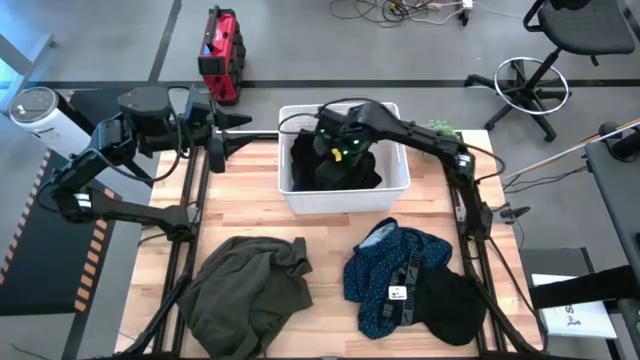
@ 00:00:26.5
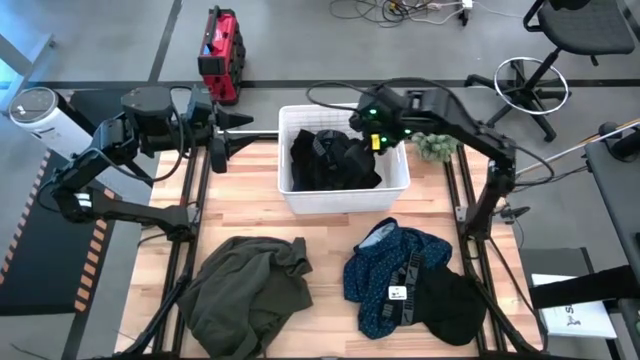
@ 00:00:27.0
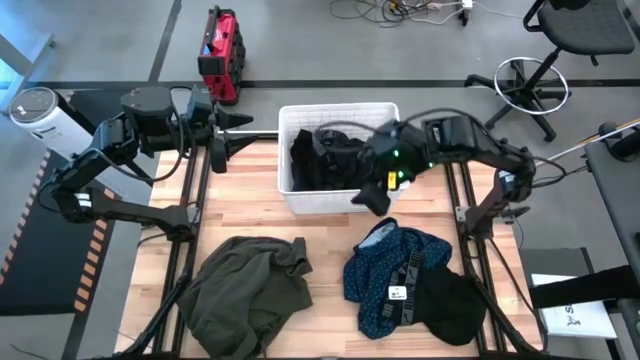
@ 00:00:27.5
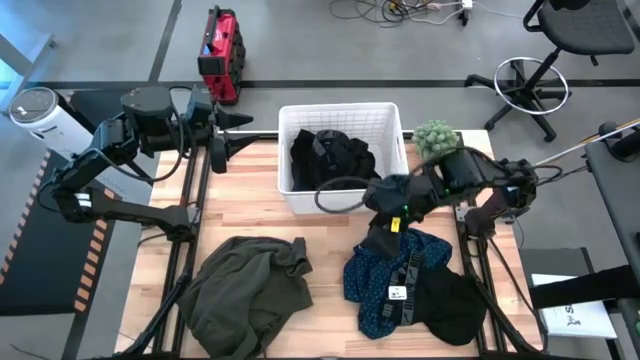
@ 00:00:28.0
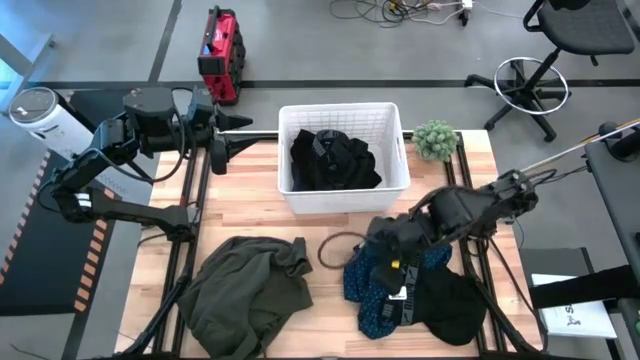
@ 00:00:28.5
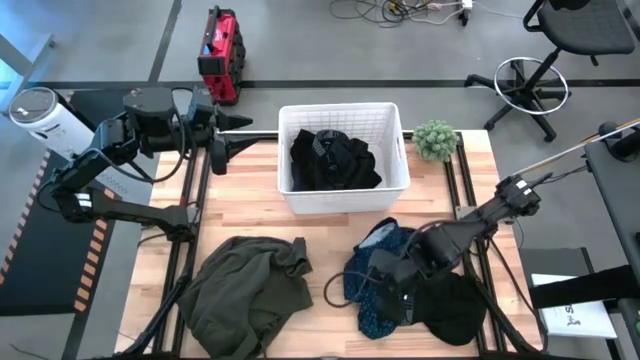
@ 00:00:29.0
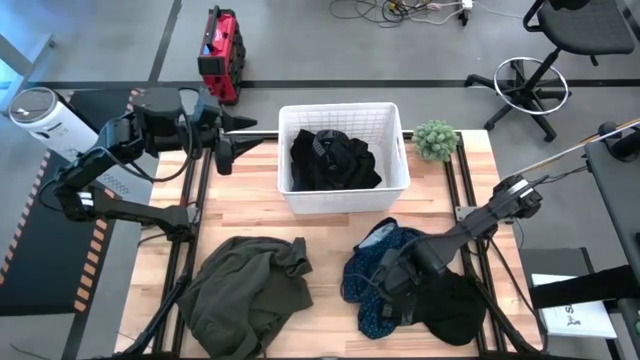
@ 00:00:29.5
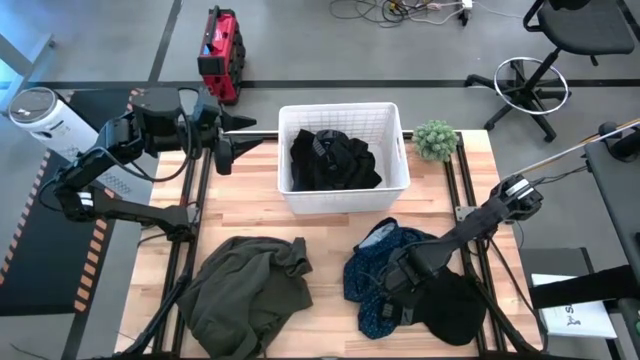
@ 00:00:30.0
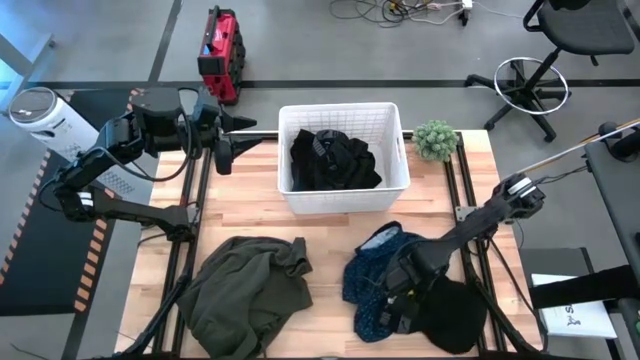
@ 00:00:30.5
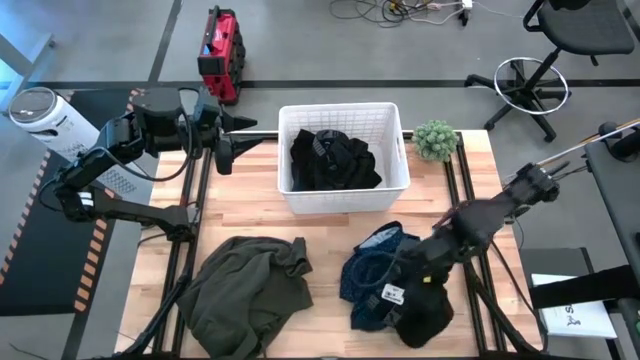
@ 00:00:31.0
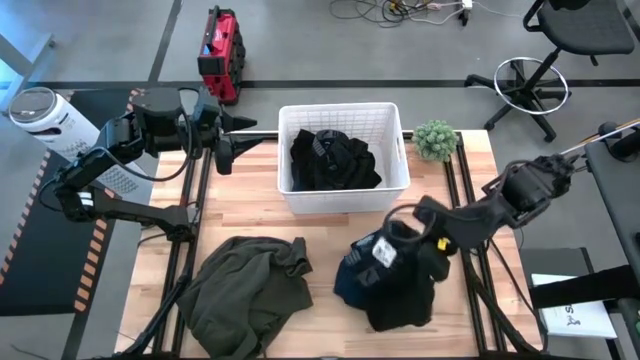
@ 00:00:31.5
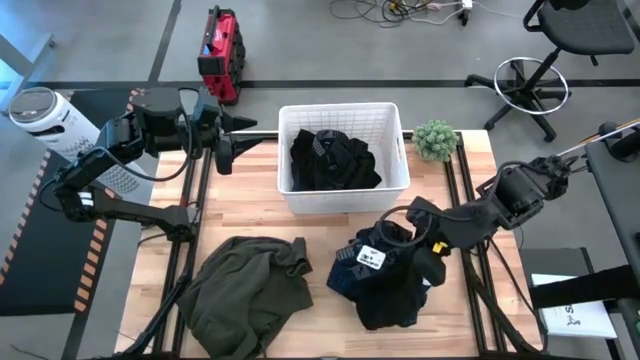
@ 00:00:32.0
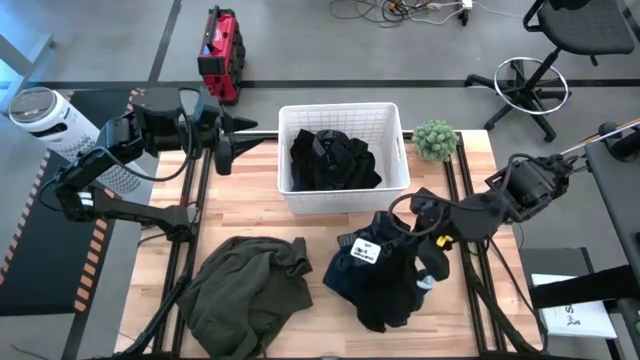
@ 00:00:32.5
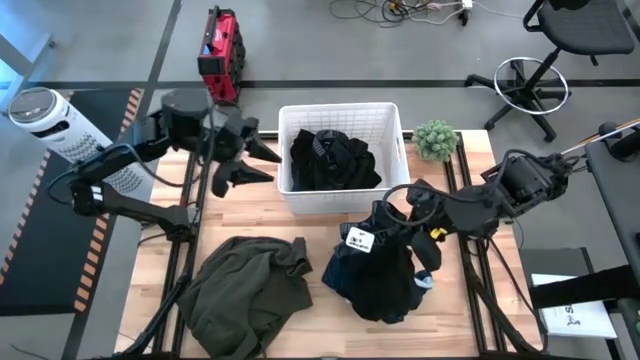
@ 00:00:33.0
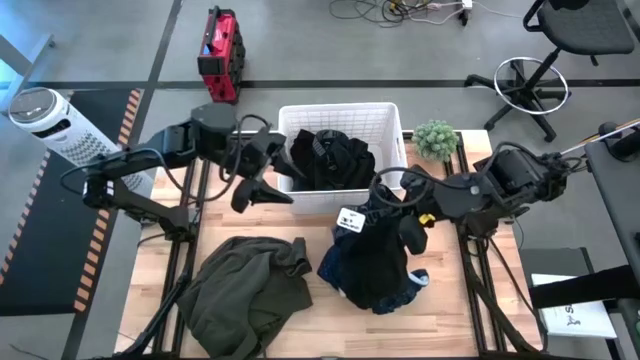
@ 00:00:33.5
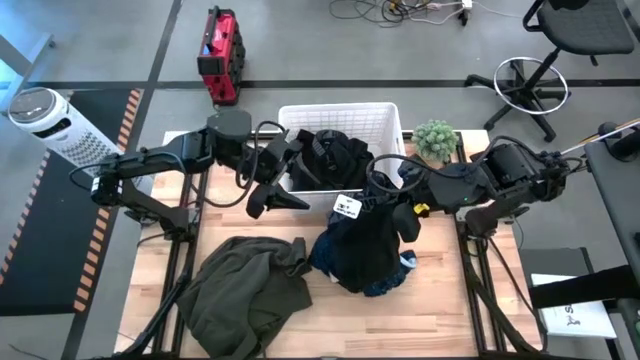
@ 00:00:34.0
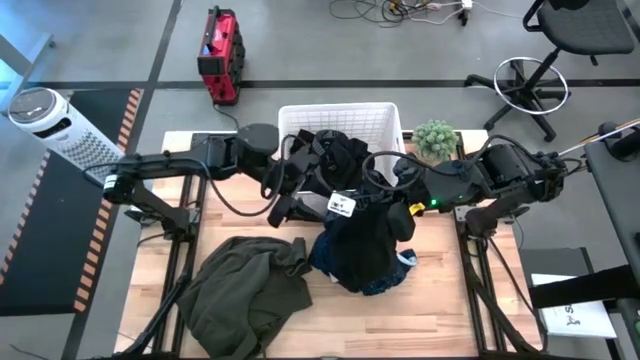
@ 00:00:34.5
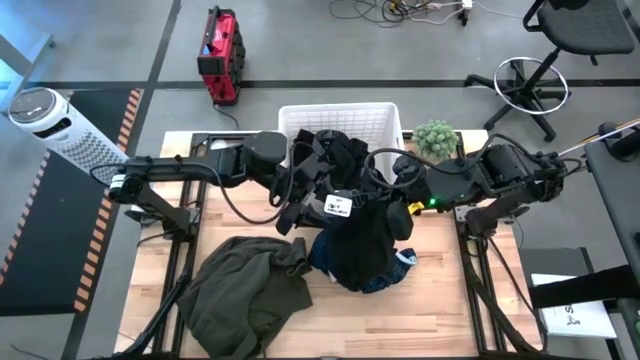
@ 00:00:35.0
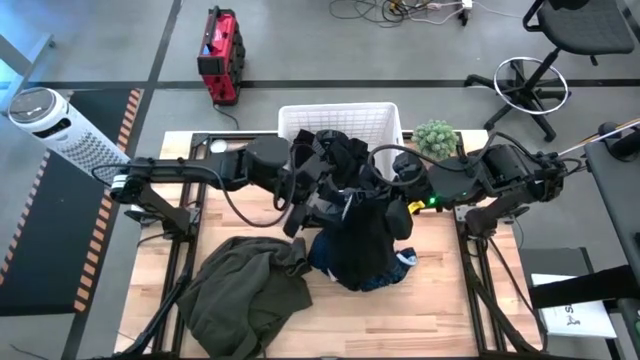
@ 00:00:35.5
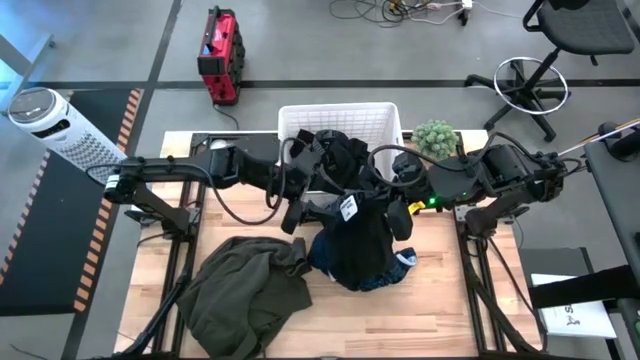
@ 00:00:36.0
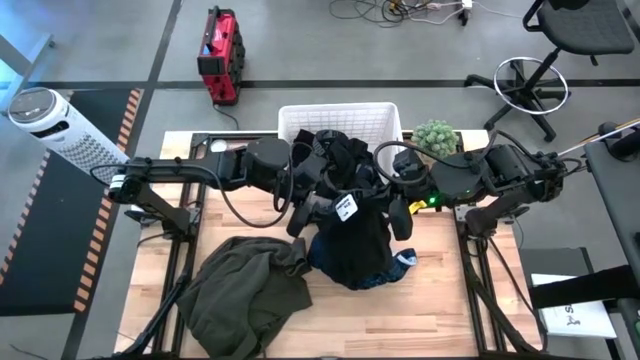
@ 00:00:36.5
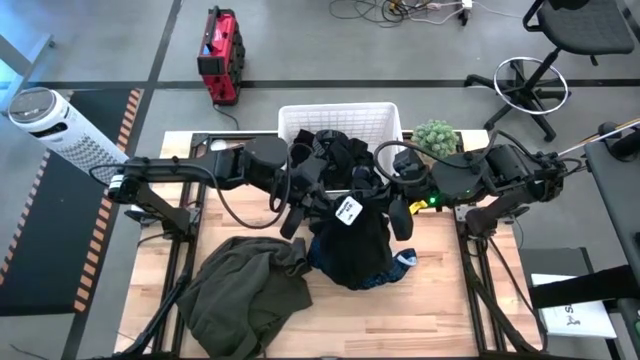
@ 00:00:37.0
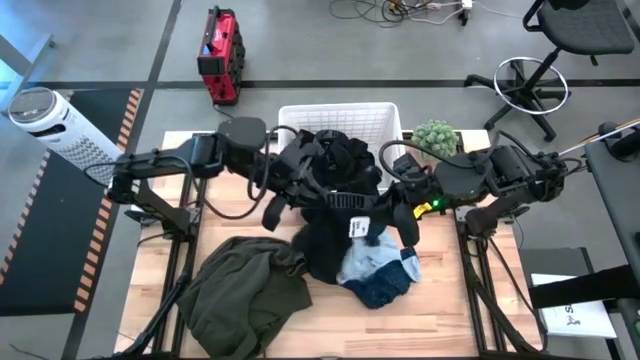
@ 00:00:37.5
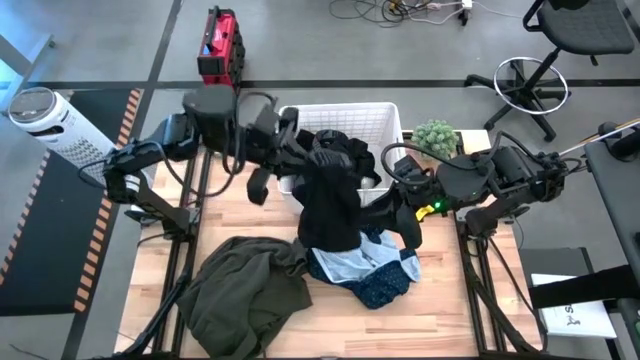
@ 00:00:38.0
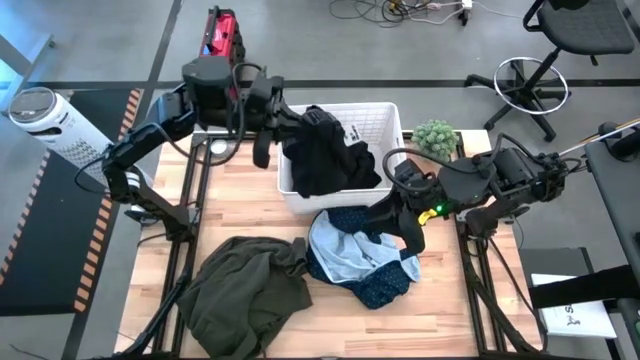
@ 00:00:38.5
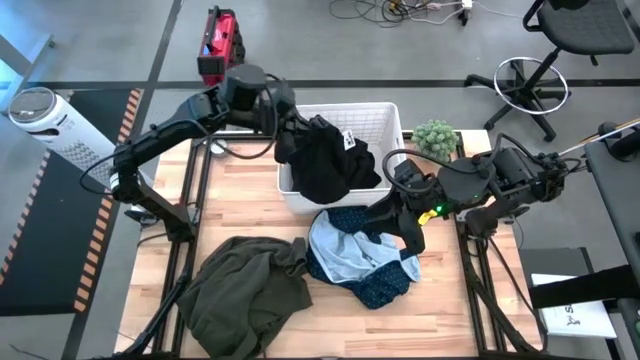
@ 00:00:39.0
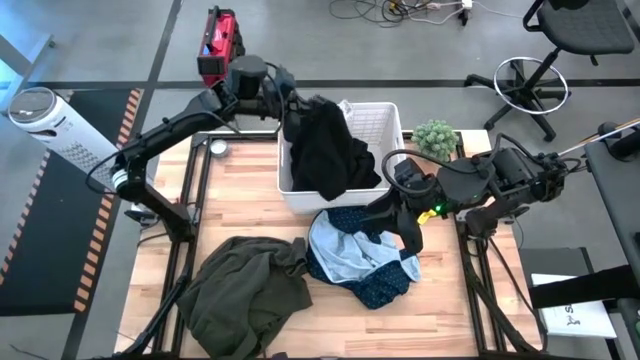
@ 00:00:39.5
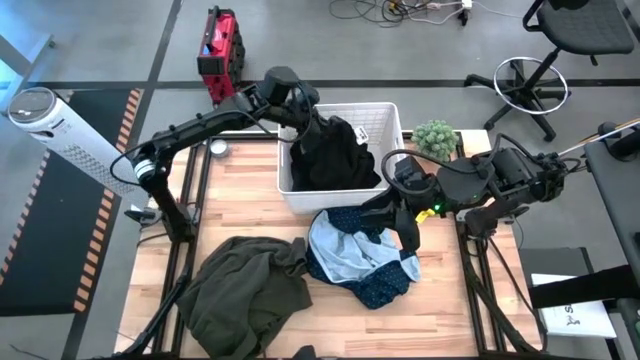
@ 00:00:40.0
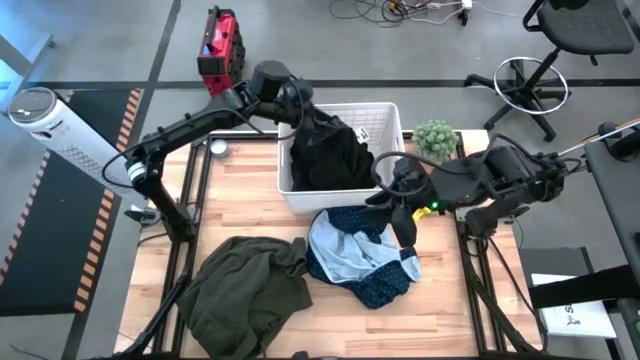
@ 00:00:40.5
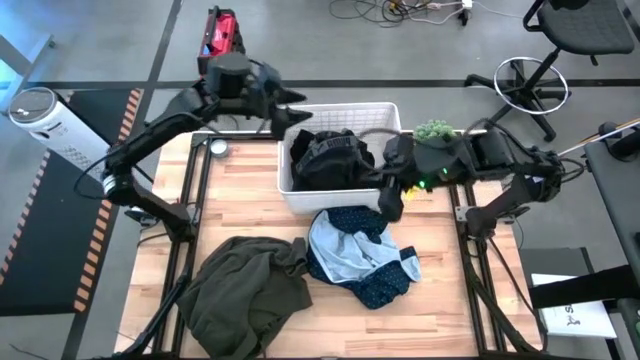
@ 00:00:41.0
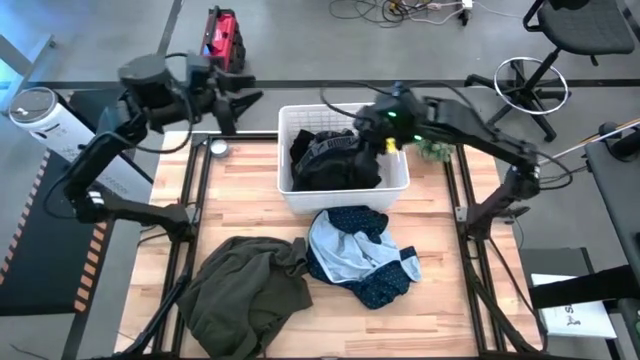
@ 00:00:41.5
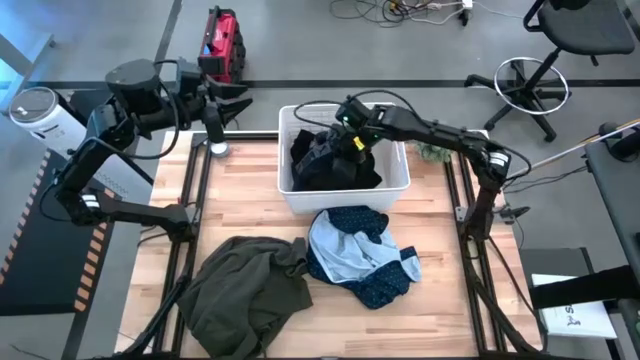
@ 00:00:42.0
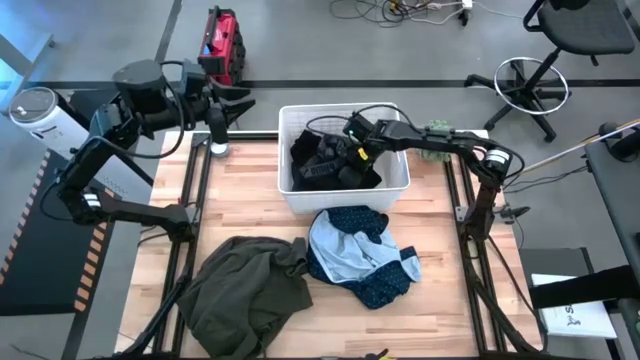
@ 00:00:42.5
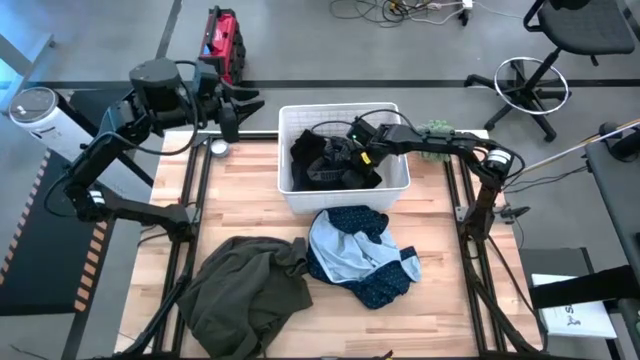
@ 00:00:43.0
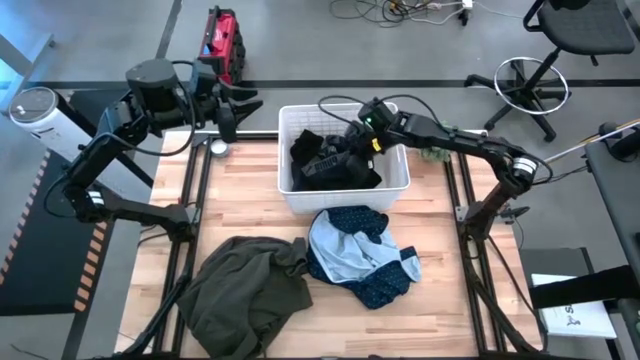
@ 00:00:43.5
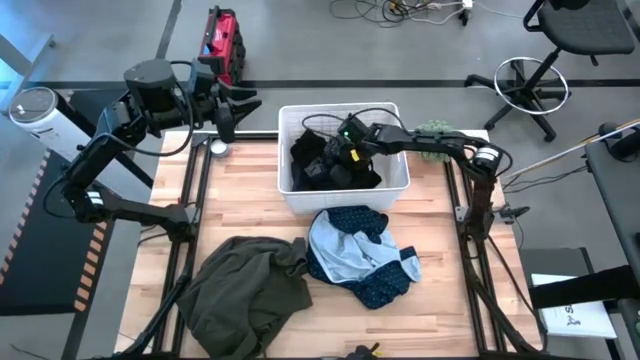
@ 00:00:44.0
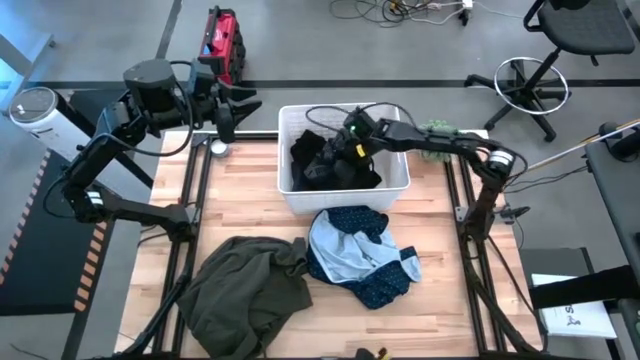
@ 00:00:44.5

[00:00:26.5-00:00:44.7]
Task: Sort clothes
Put the black boxer into the white bin

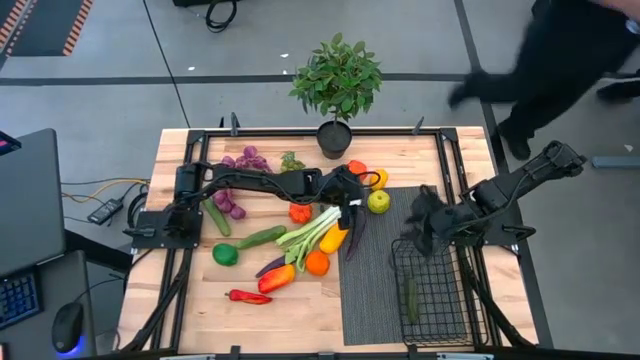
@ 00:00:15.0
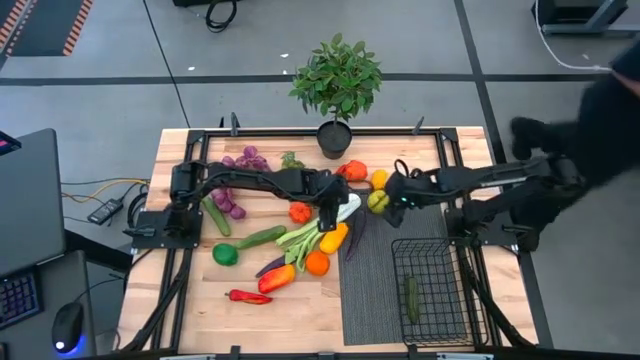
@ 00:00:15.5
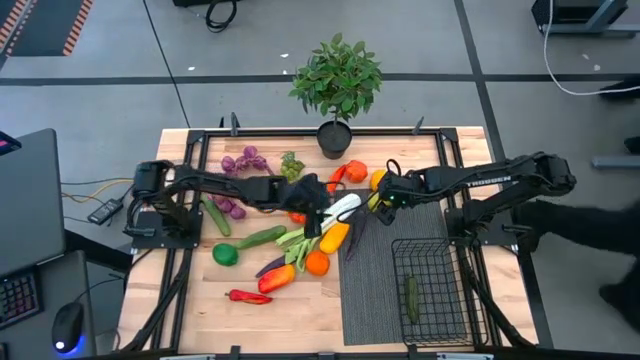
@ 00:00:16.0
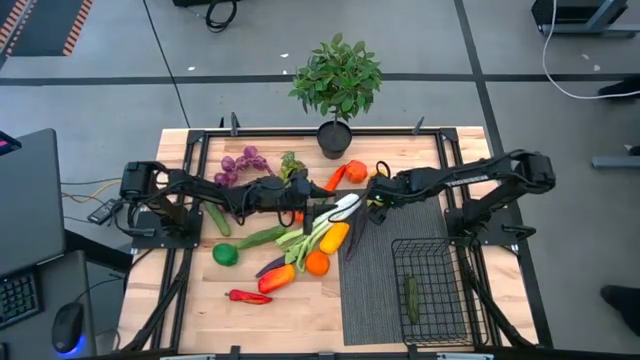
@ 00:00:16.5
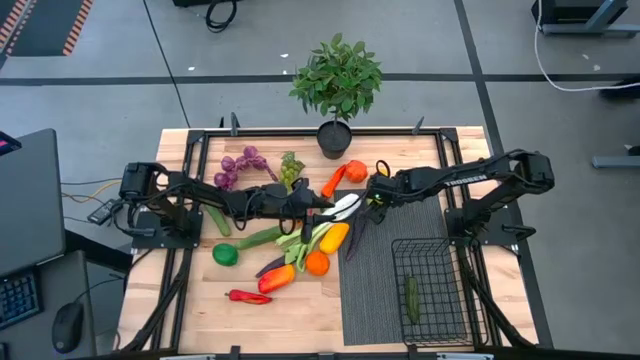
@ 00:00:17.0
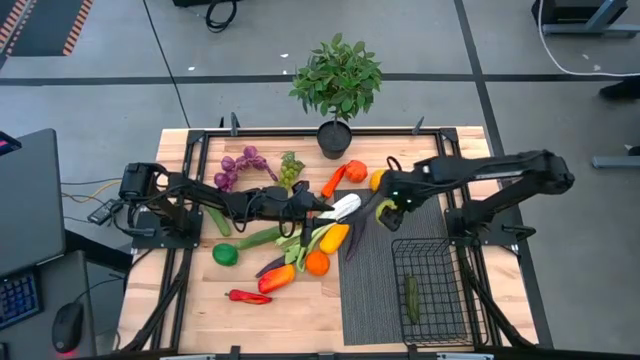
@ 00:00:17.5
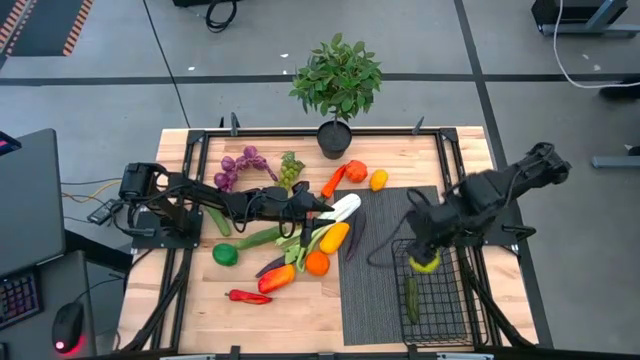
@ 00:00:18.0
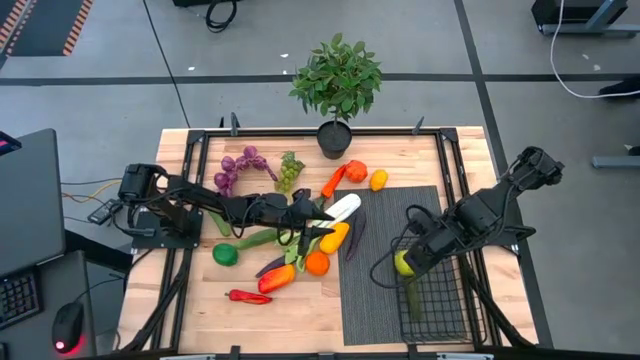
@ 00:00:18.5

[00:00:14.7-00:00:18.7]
Task: Build produce basket
Put the peach into the black wire basket
